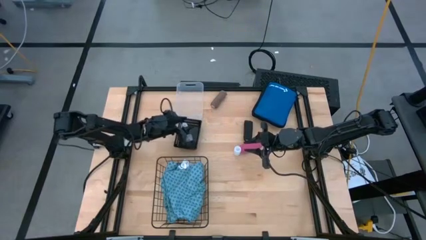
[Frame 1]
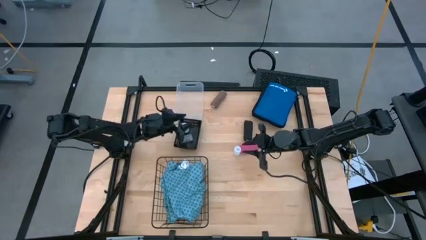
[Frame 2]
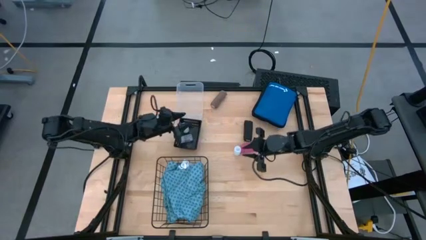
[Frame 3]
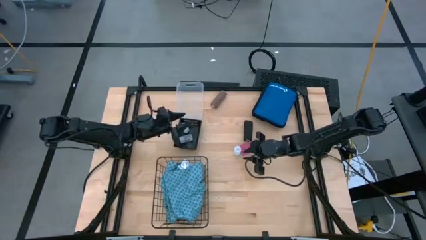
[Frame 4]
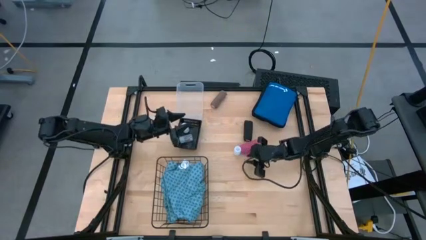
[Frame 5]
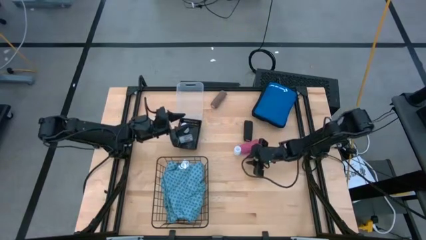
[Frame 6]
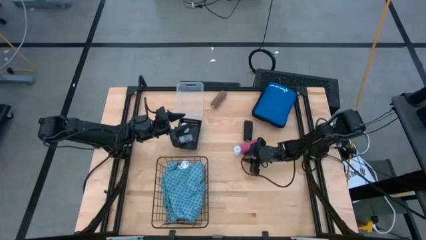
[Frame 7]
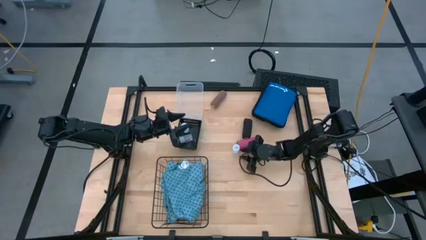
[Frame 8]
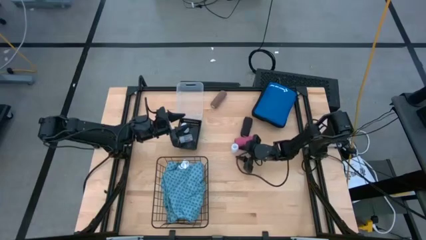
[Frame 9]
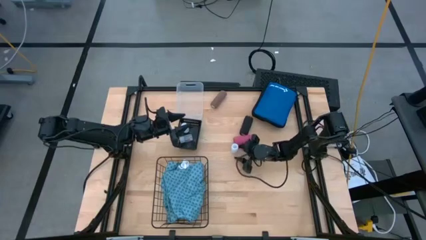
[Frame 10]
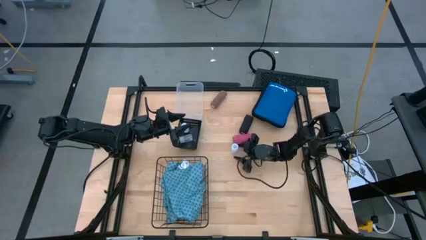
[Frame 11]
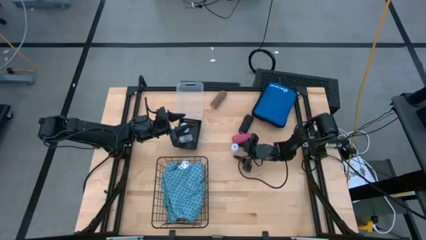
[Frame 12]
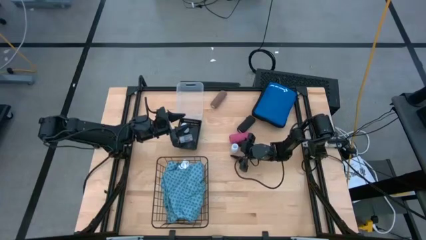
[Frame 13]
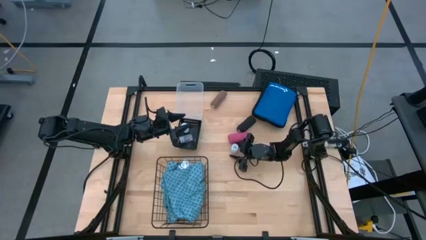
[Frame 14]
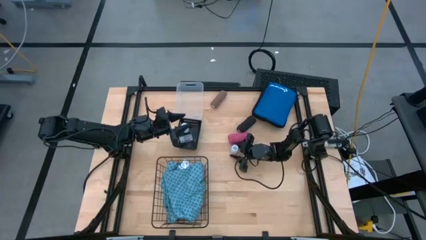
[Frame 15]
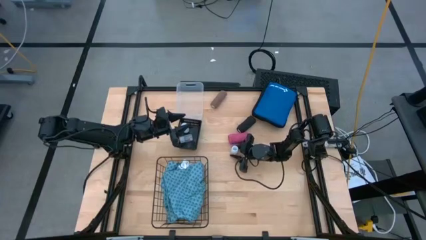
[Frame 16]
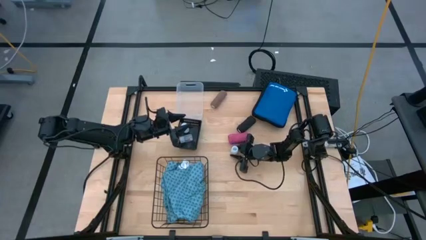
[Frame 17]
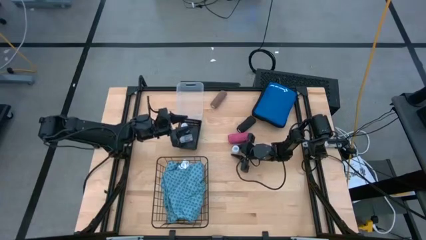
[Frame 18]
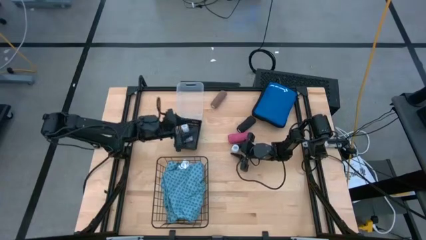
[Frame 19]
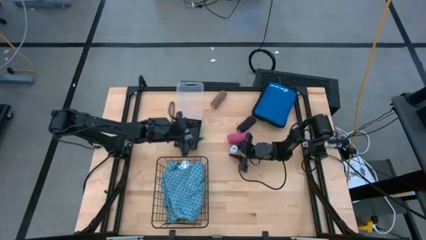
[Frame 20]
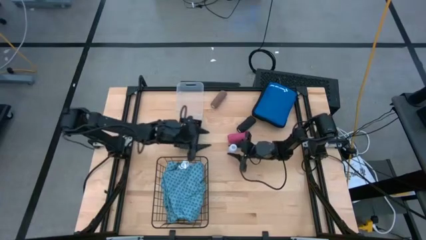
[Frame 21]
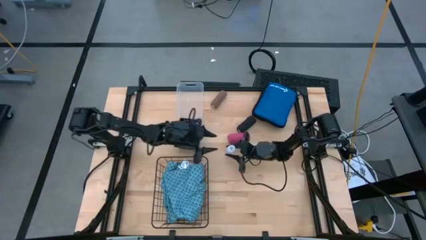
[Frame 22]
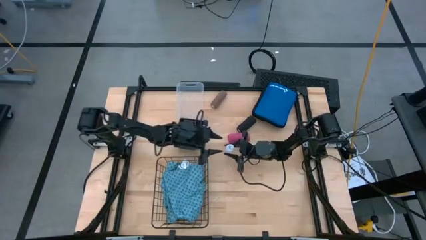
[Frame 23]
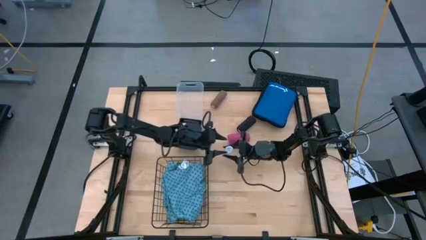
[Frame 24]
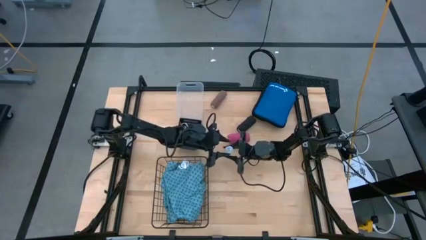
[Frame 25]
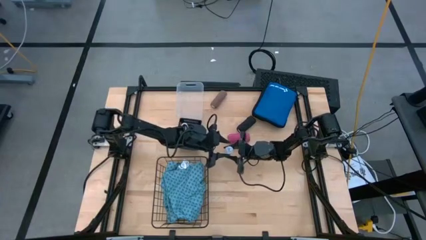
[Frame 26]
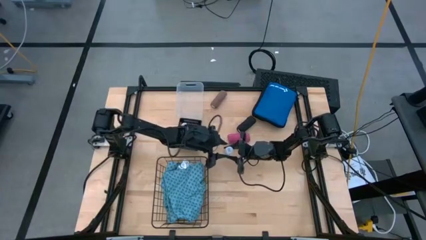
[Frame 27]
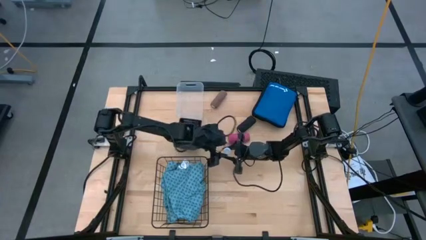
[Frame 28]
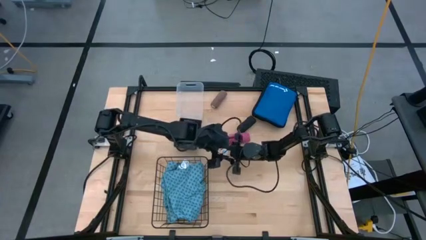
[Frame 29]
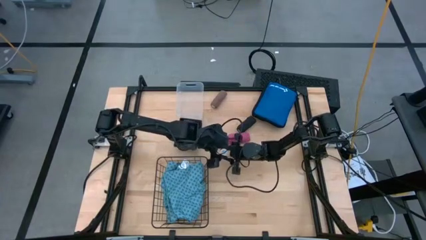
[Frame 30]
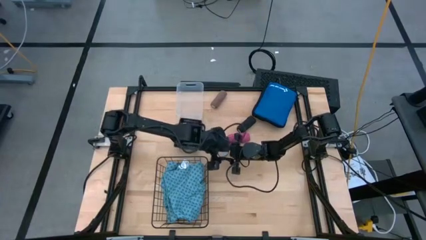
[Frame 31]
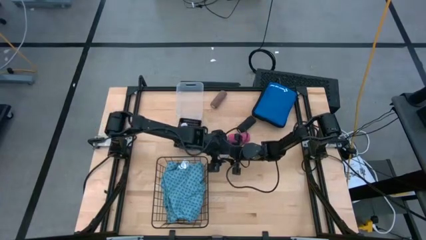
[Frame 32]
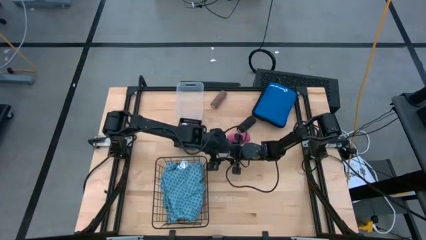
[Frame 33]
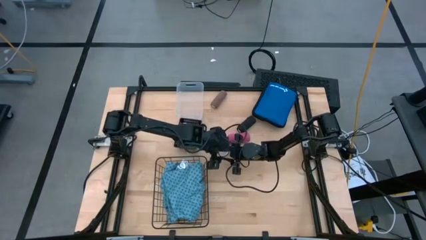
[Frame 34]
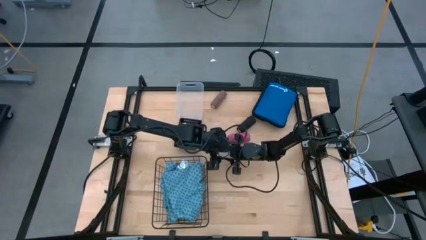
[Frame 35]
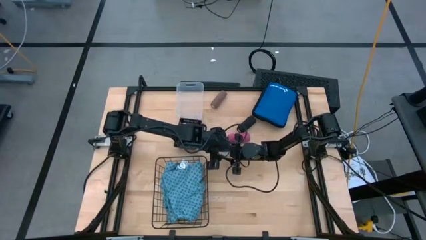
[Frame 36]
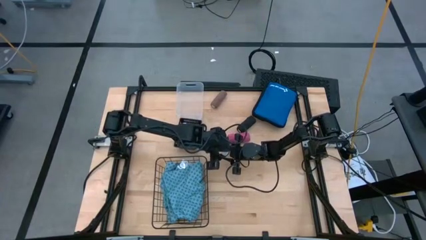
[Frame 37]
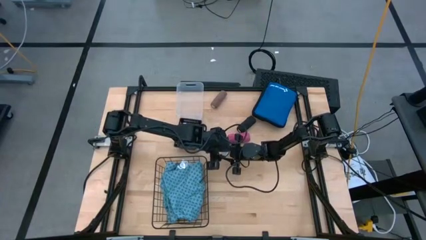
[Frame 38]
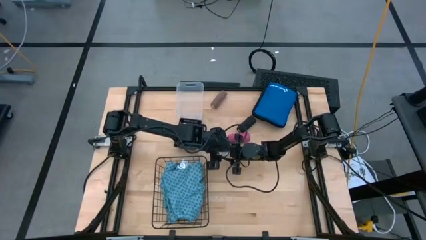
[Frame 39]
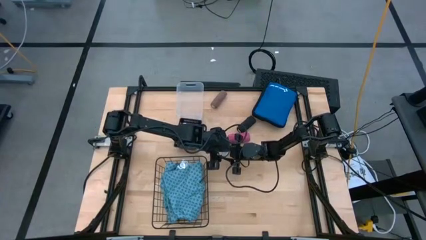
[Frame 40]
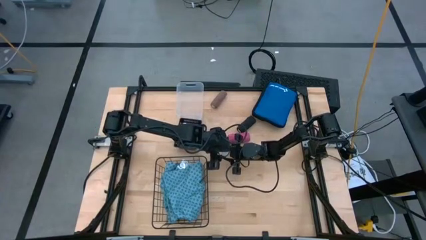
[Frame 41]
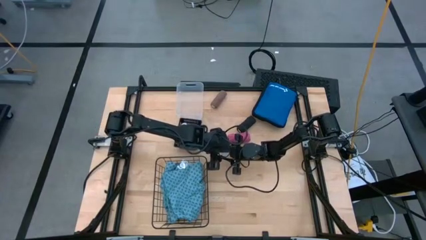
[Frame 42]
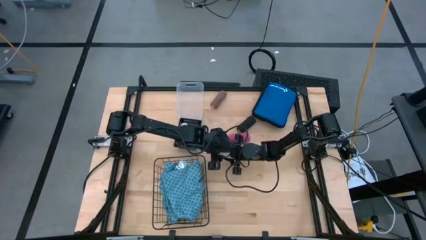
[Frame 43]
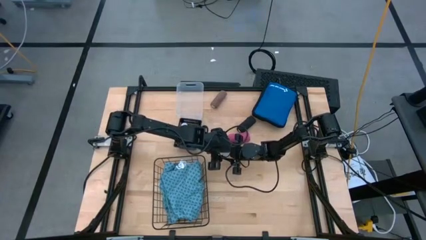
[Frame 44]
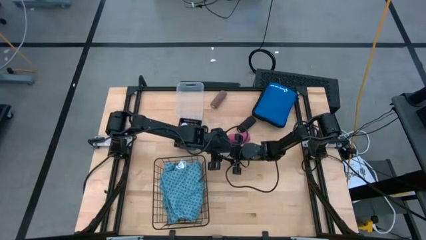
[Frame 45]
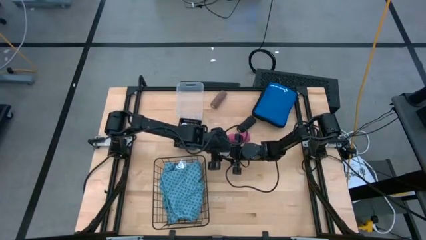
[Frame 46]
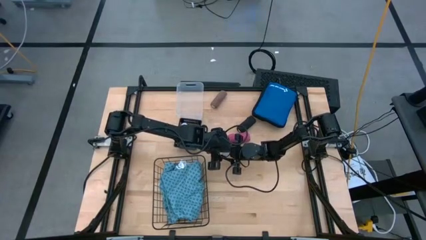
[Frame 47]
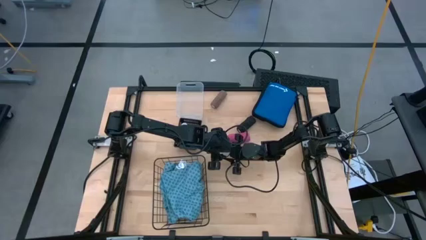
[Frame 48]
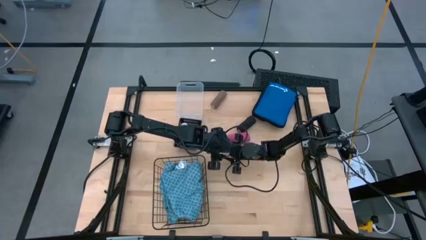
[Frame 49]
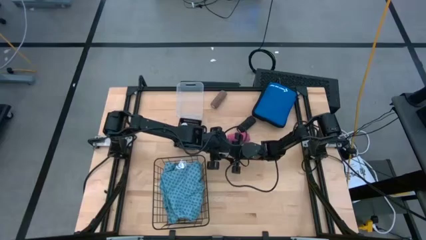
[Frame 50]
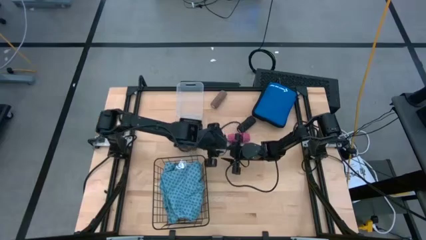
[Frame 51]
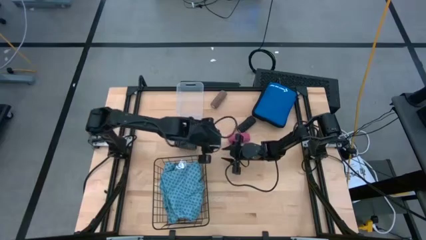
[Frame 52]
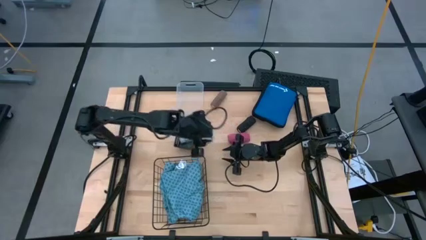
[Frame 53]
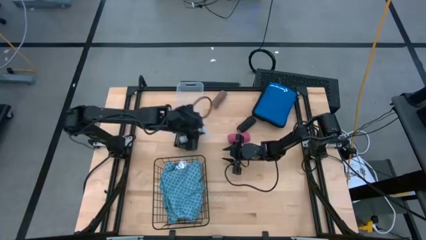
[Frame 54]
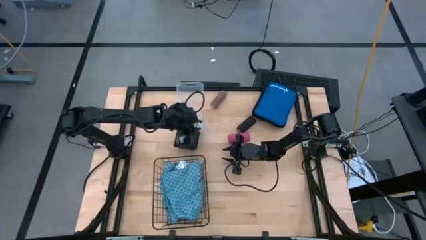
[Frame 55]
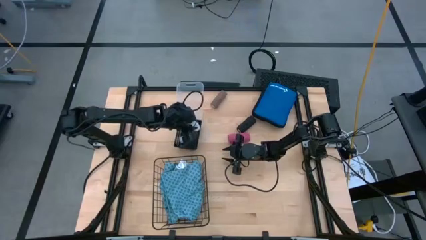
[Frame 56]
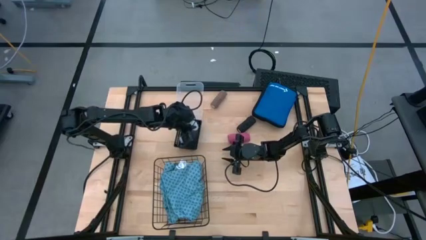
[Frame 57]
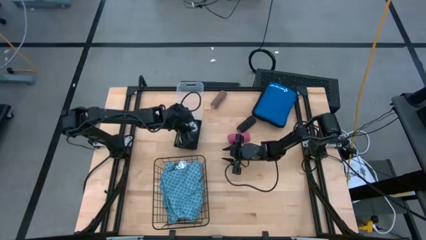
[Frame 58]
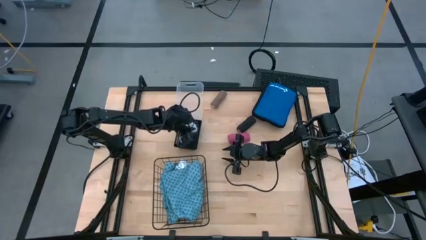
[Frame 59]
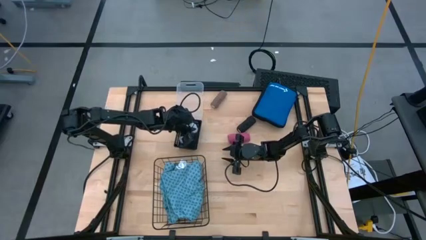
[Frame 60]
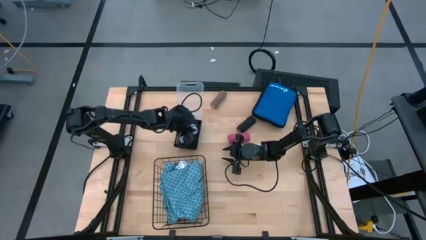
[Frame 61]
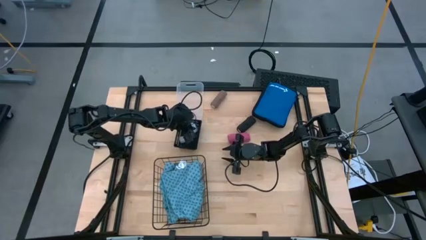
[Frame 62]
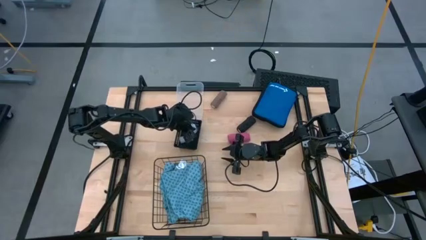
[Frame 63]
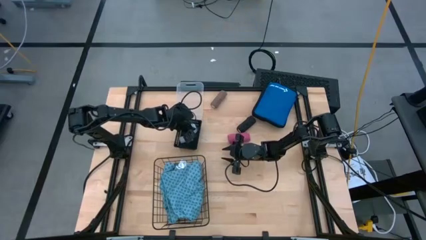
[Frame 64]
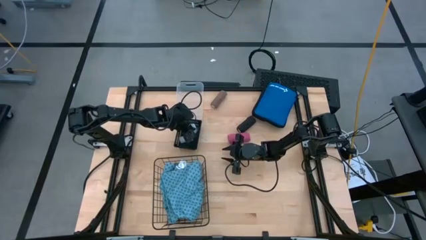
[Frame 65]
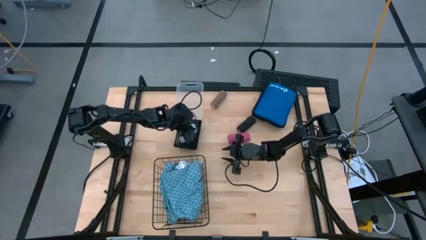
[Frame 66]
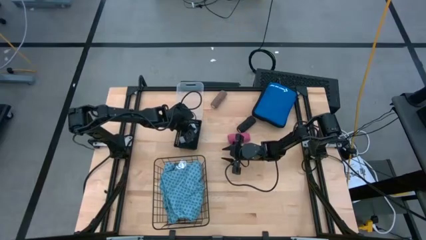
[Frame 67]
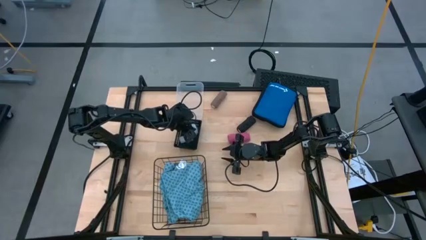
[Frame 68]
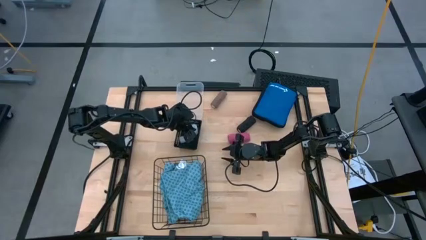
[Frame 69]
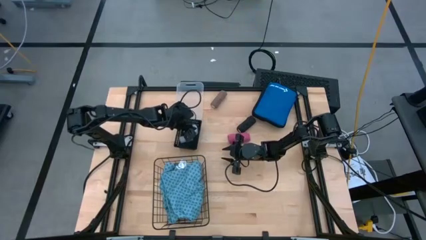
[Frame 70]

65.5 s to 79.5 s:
Task: Pick & place medical supplies in basket/bin
Put the white pill bottle into the black bin
